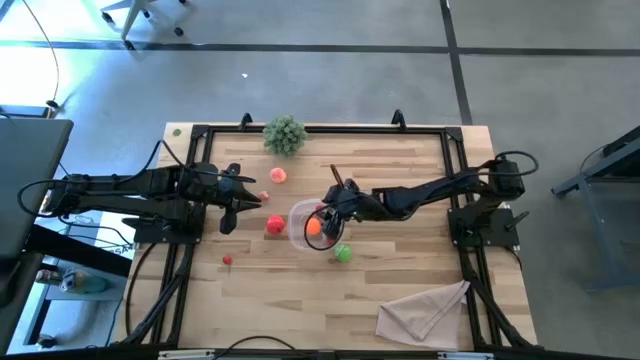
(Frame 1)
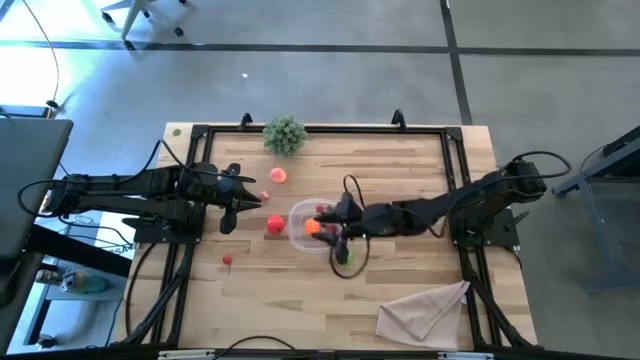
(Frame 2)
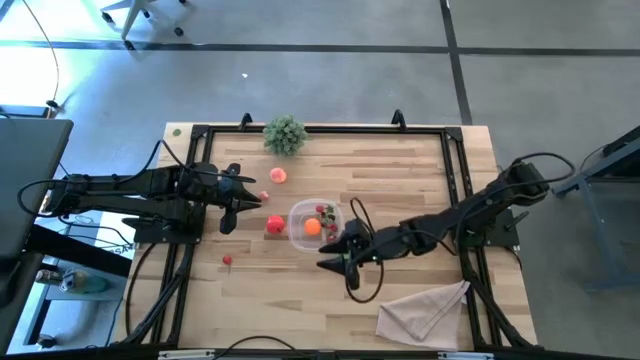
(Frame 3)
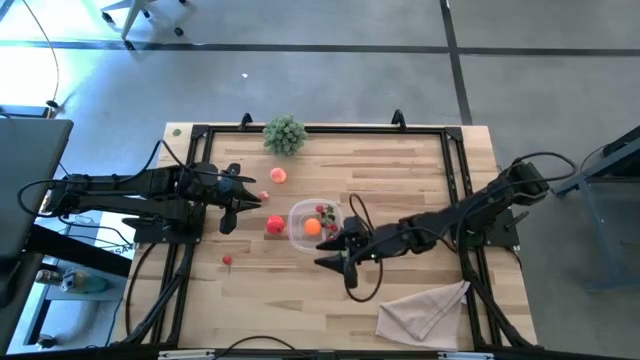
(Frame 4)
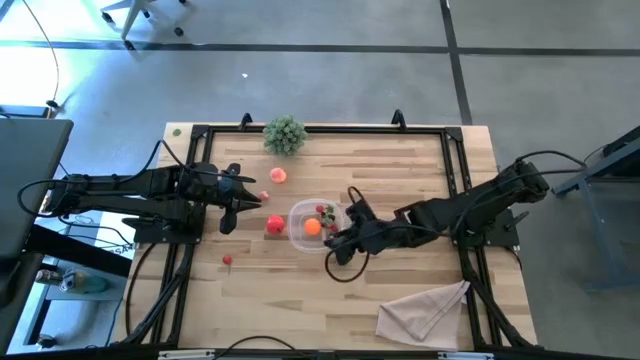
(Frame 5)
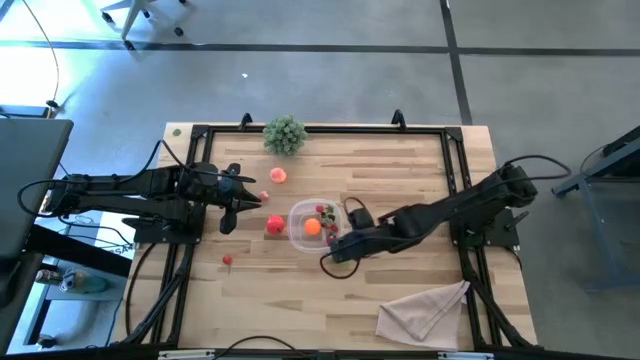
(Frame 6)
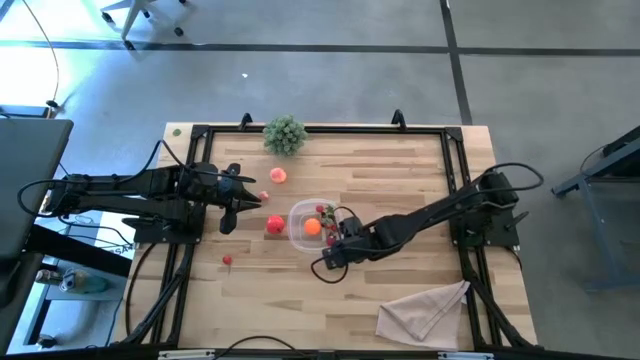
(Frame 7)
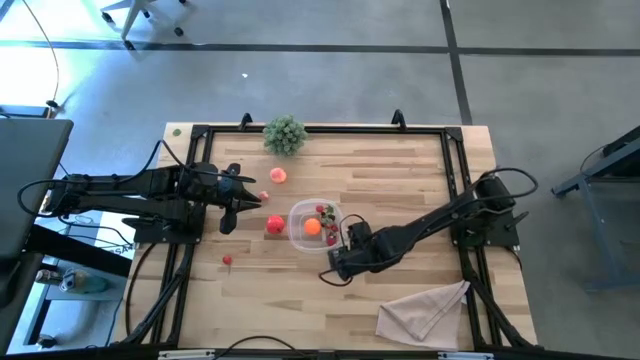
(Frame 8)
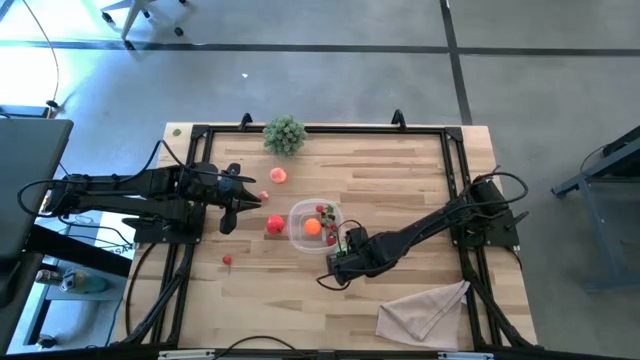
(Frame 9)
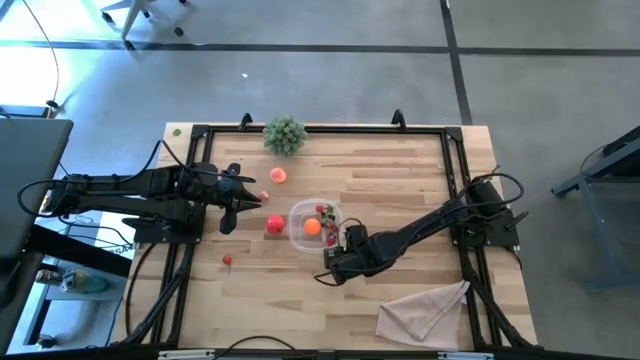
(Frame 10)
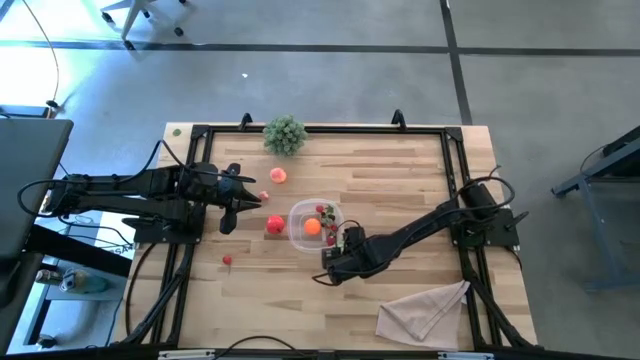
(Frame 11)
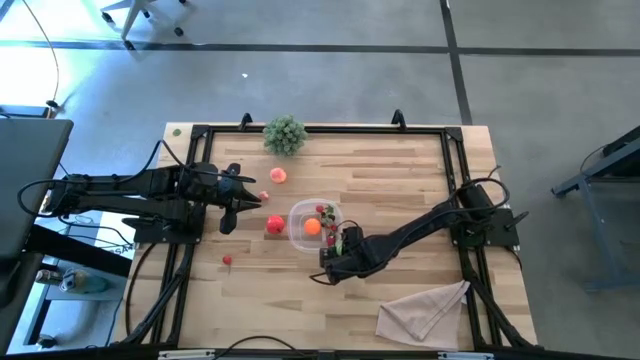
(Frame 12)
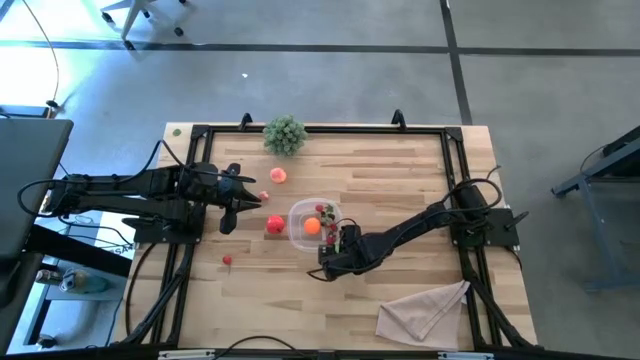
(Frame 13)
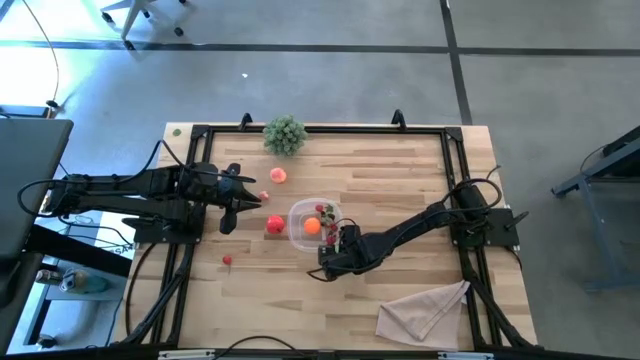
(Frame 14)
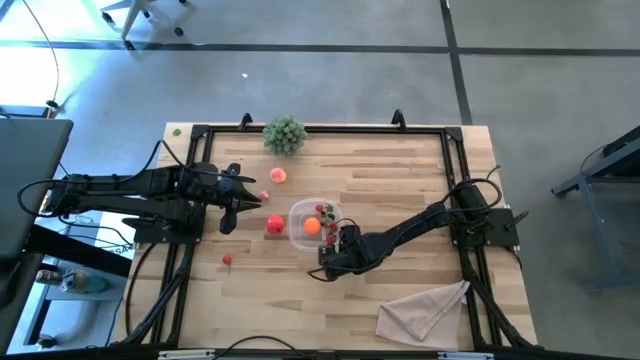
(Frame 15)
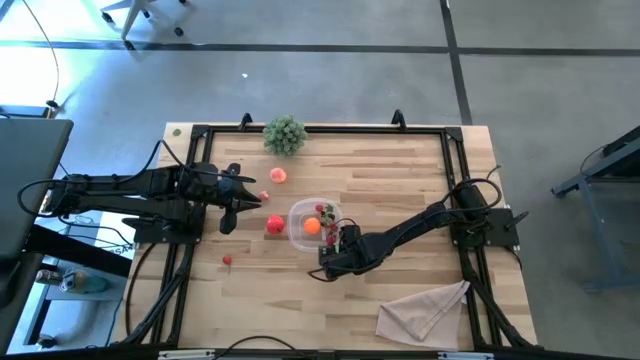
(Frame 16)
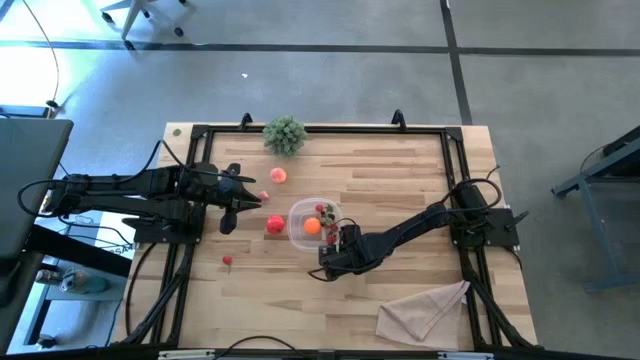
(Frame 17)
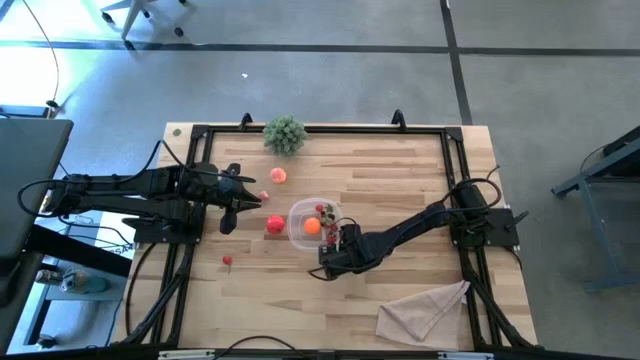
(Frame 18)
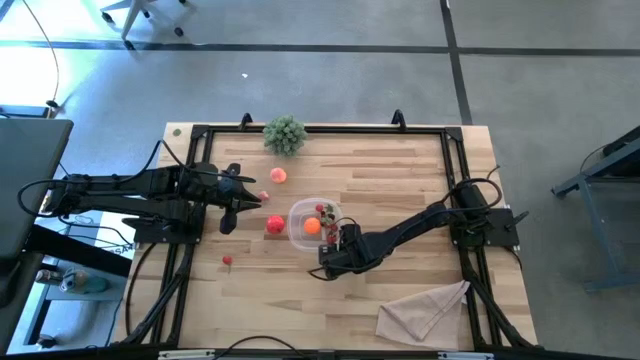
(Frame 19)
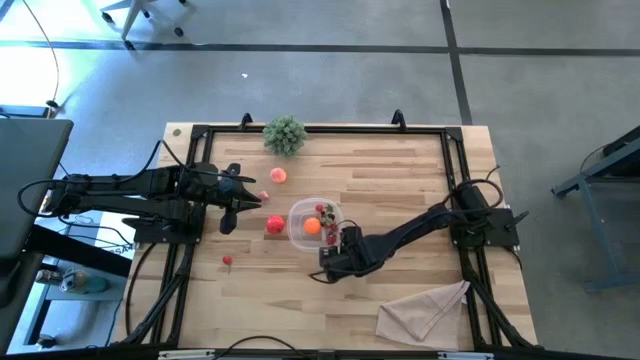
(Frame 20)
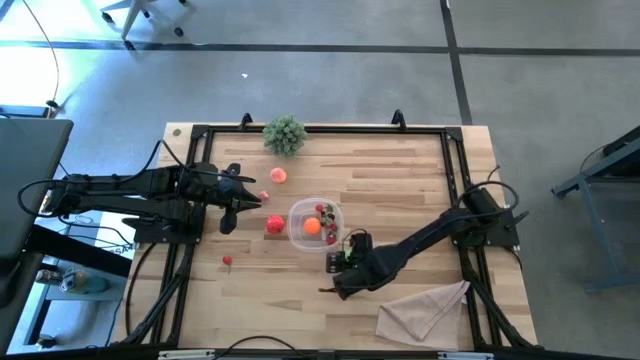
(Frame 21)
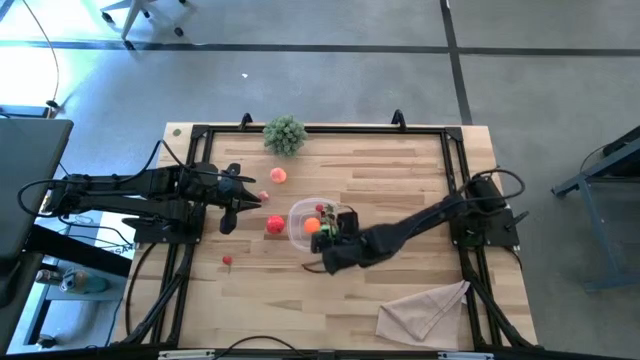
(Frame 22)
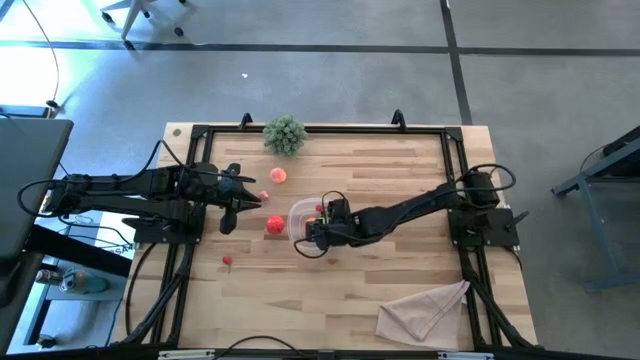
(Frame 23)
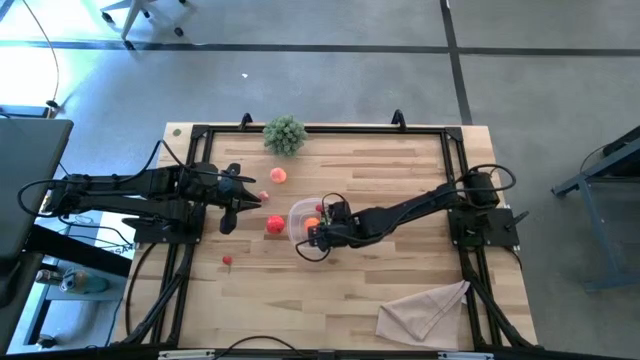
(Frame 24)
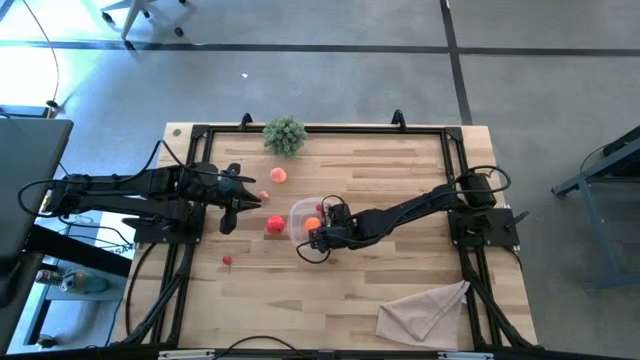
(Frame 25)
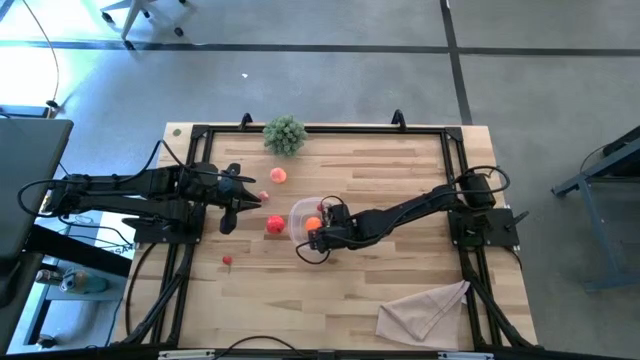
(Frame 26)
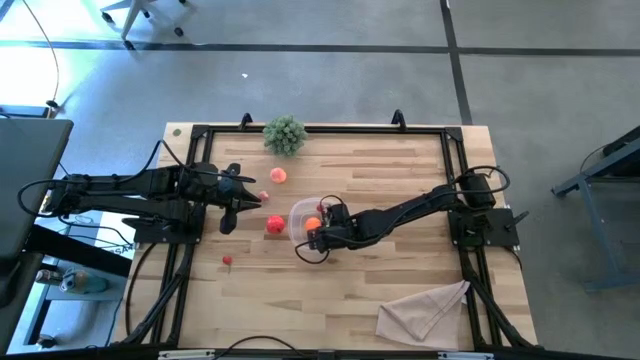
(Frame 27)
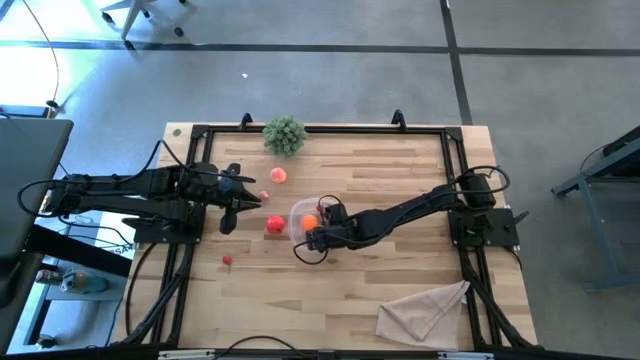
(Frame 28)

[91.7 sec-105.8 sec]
Task: Pick and placing Produce into tupperware
Put the cabbage into the transparent bin

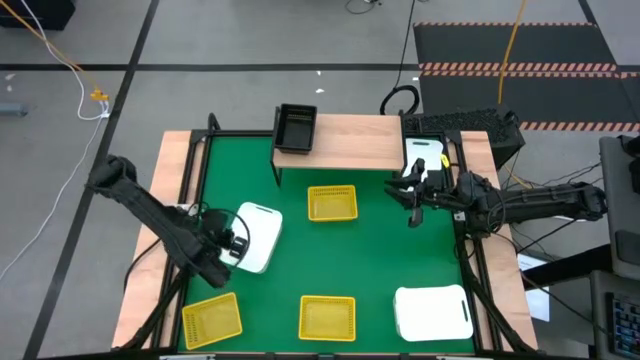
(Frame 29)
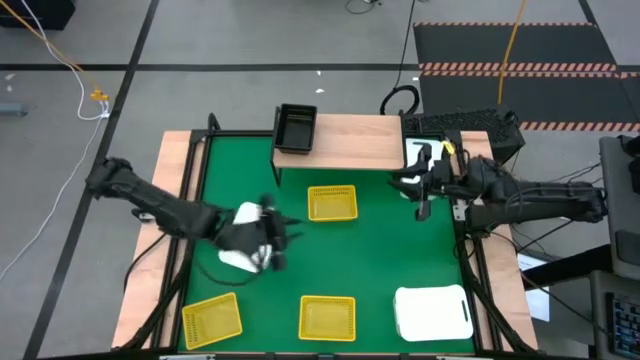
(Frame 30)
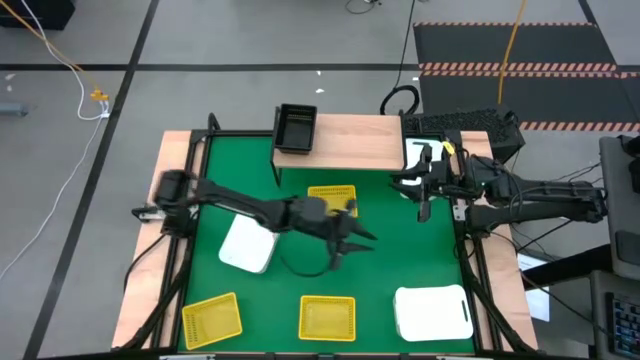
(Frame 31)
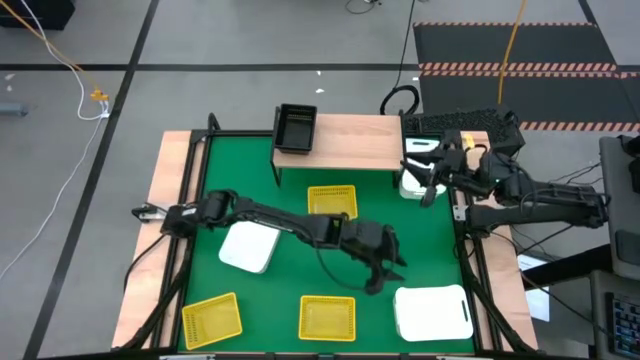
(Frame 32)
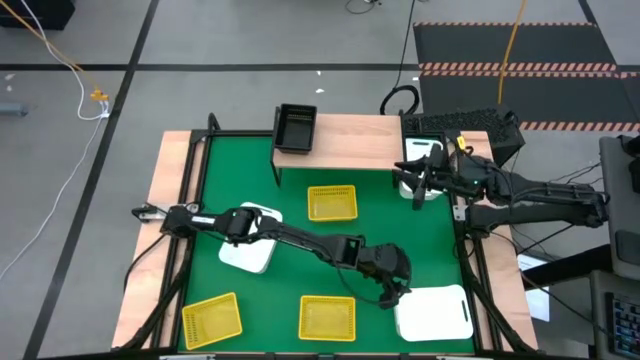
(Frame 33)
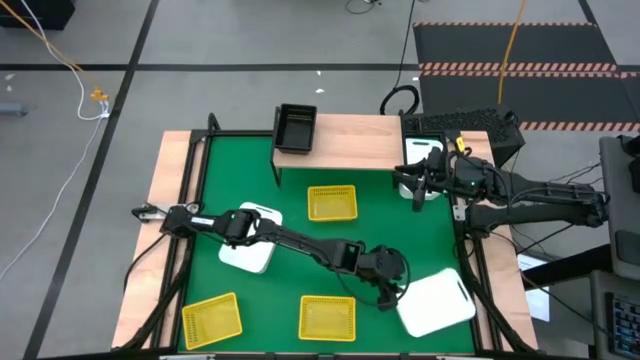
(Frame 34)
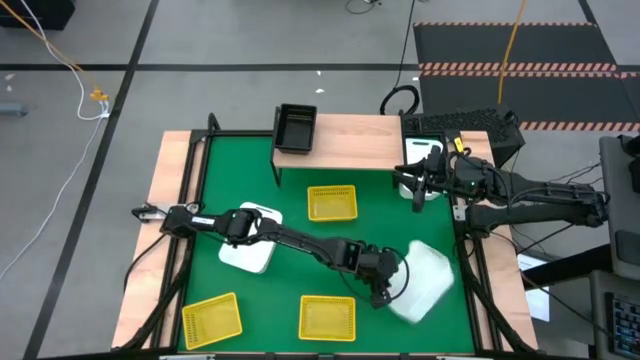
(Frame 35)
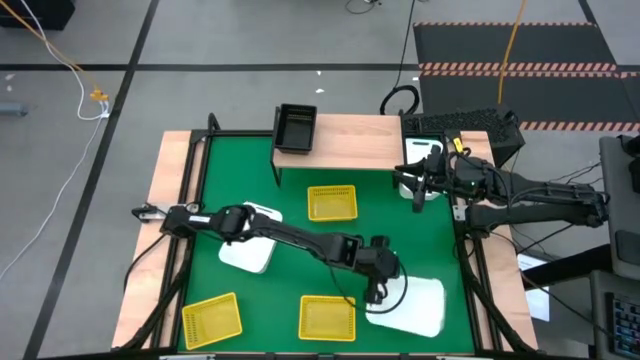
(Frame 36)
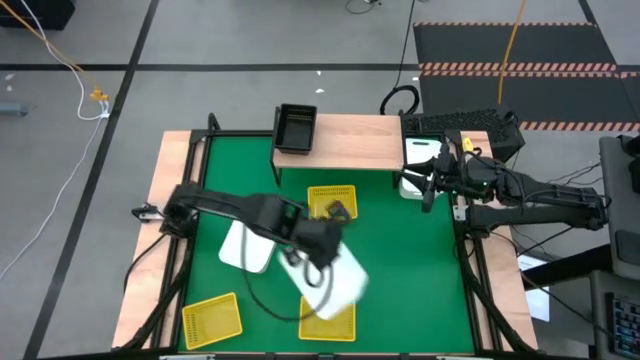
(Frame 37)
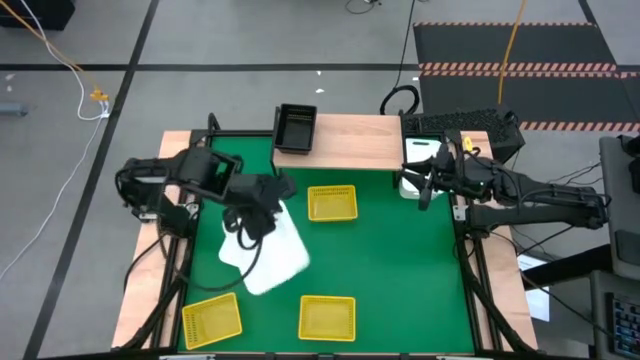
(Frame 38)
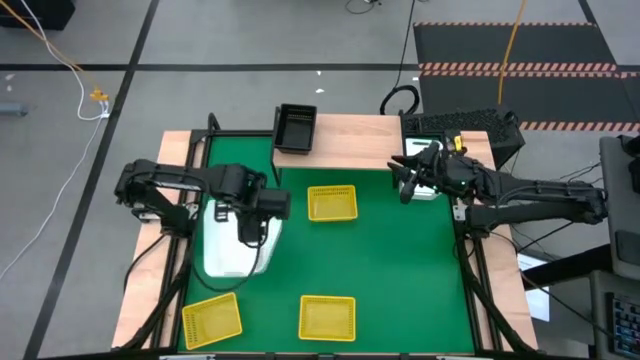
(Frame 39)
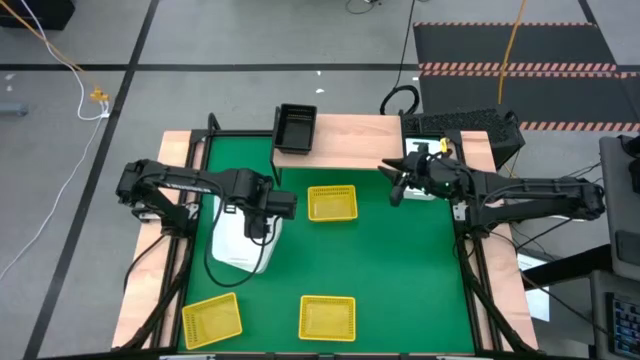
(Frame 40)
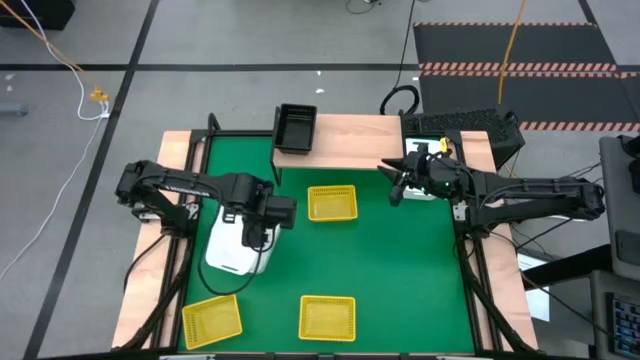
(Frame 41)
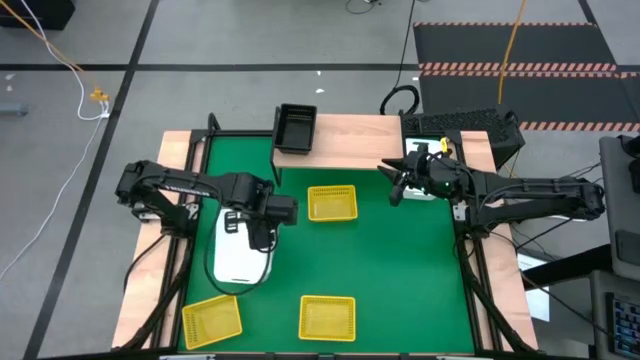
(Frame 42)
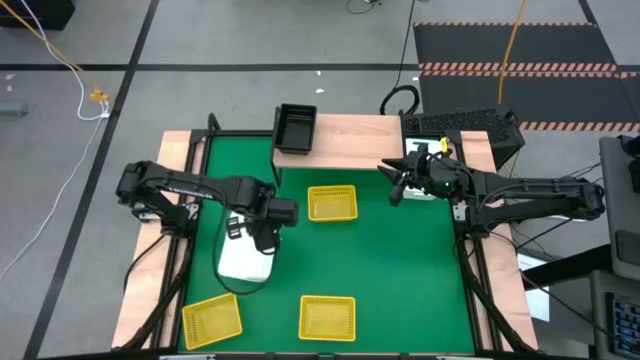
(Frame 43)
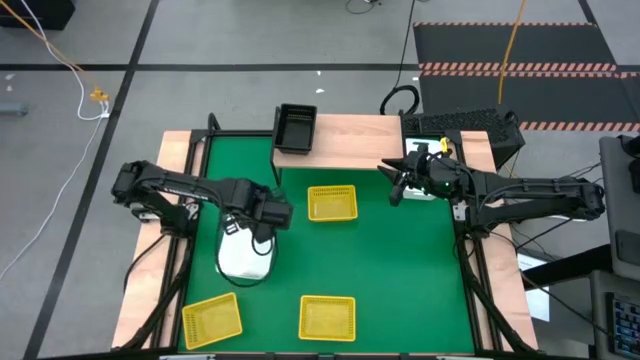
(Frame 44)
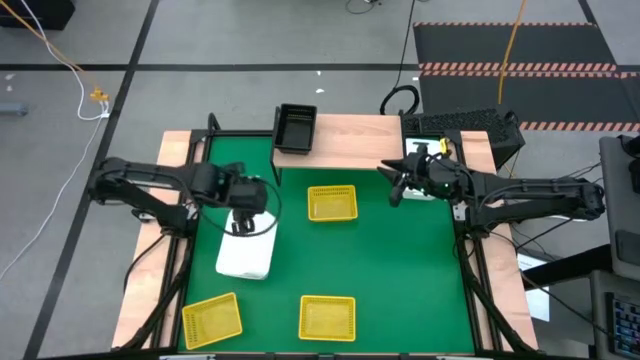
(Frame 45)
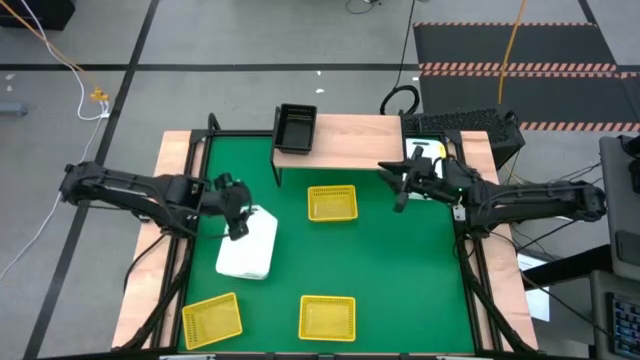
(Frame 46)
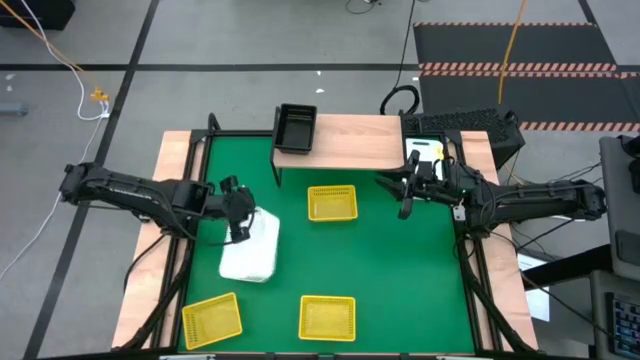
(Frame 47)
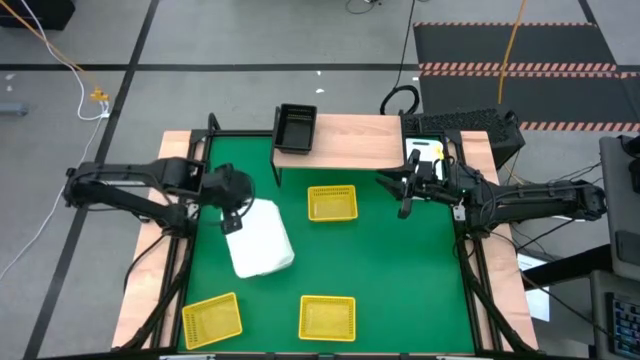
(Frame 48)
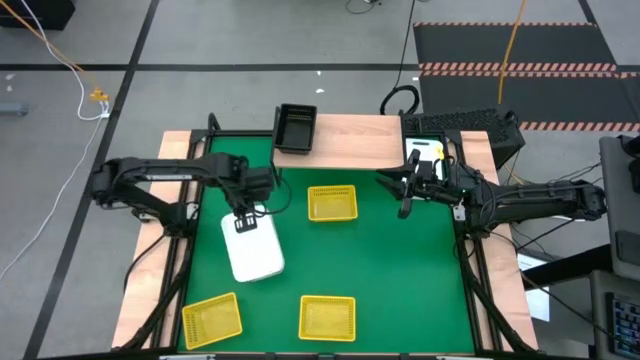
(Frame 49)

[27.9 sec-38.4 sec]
Task: Stack baskets on shelf by color
Stack the bottom white bin on top of the middle white bin
